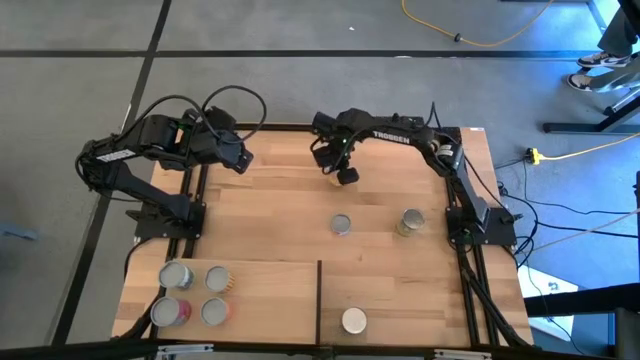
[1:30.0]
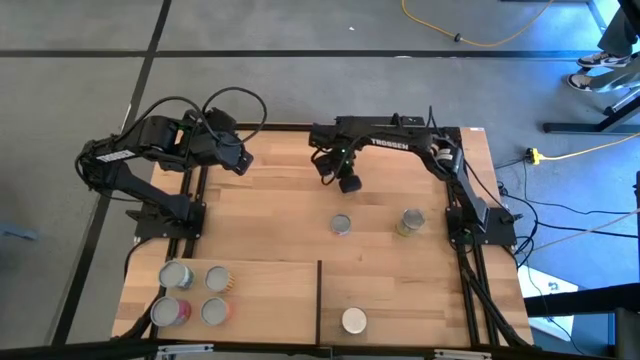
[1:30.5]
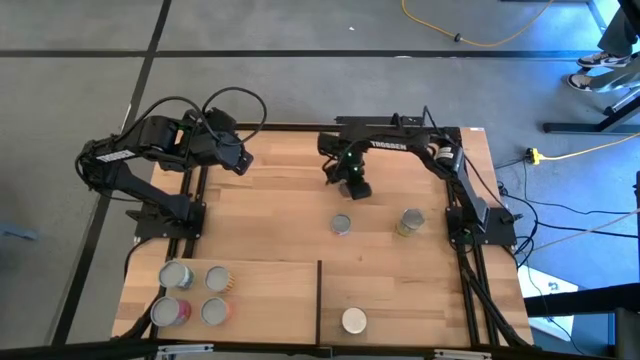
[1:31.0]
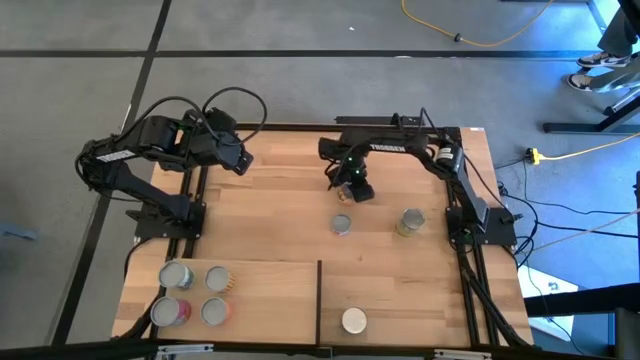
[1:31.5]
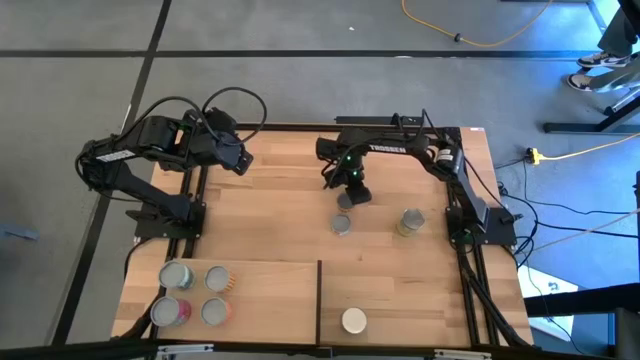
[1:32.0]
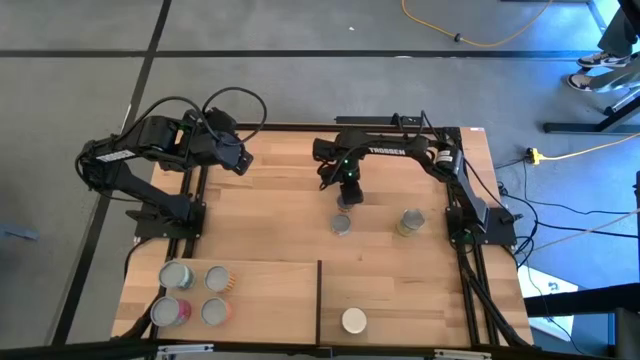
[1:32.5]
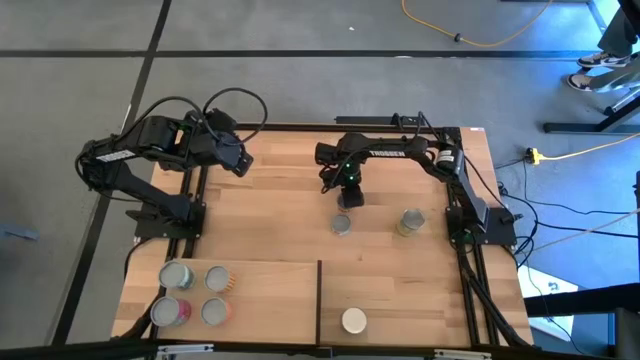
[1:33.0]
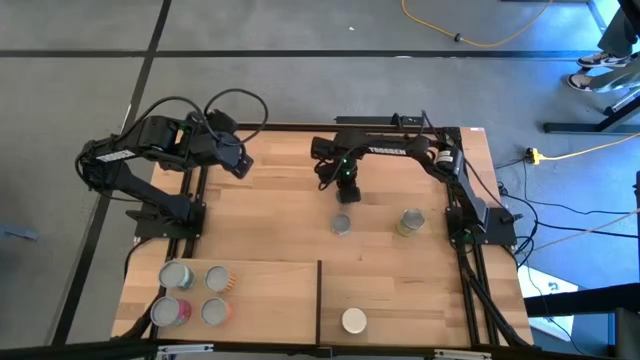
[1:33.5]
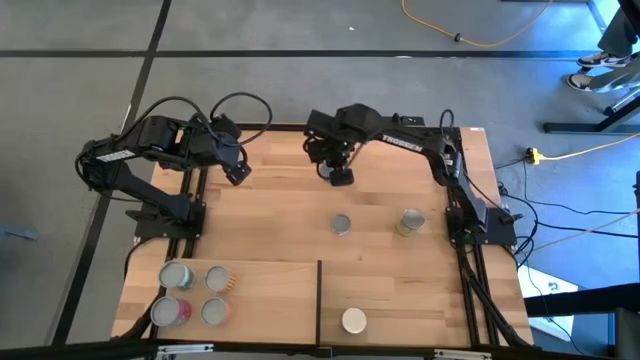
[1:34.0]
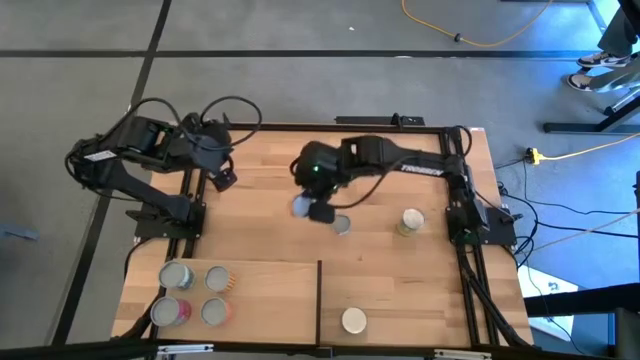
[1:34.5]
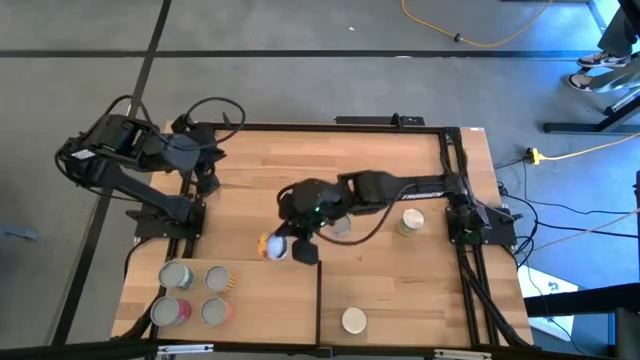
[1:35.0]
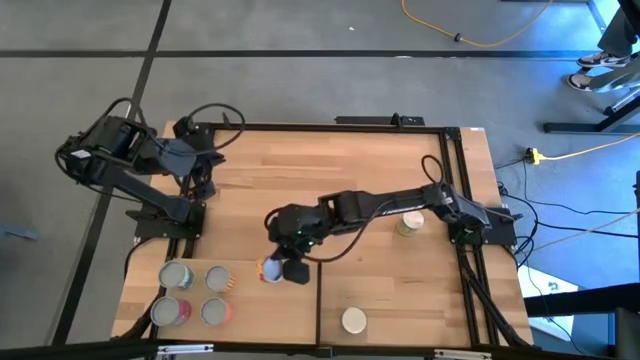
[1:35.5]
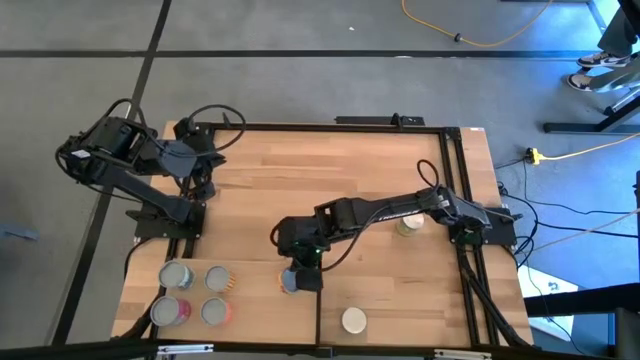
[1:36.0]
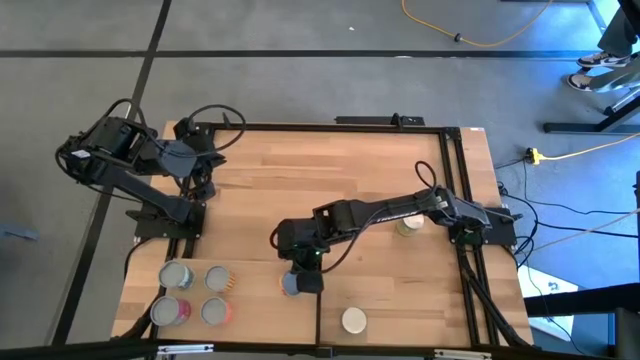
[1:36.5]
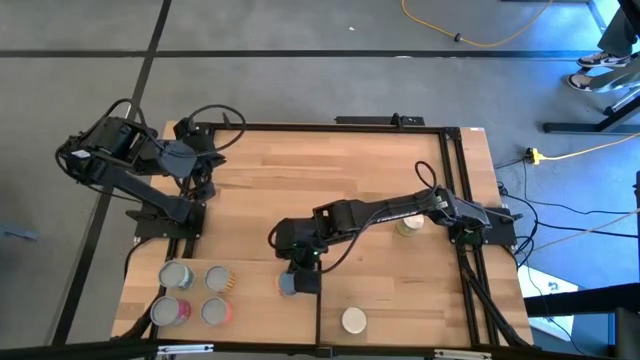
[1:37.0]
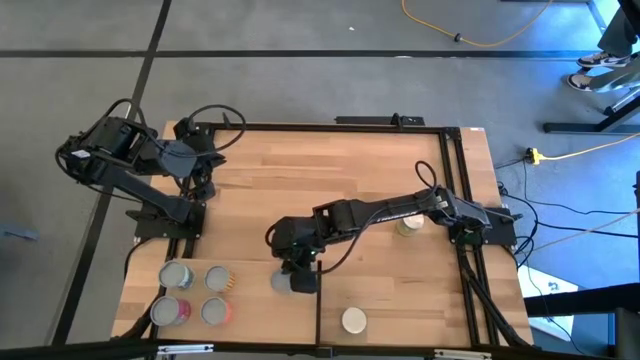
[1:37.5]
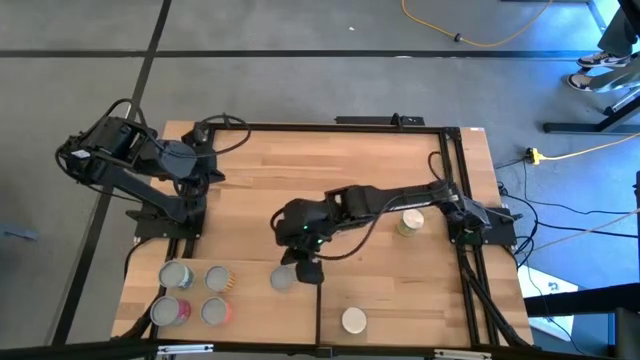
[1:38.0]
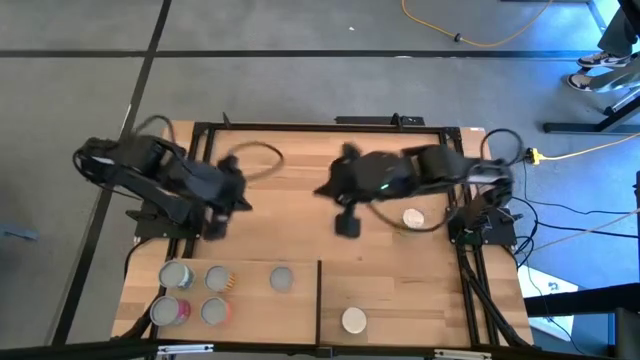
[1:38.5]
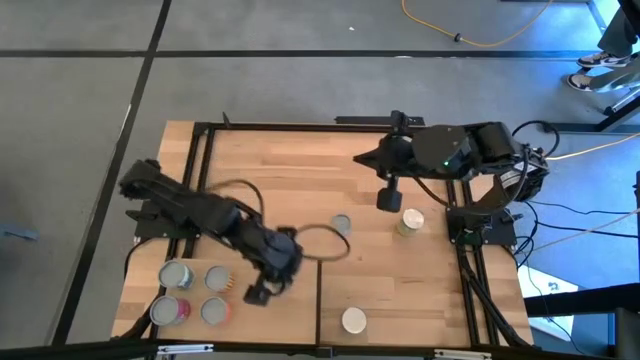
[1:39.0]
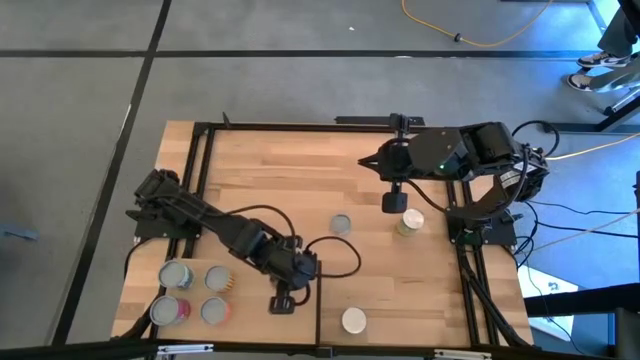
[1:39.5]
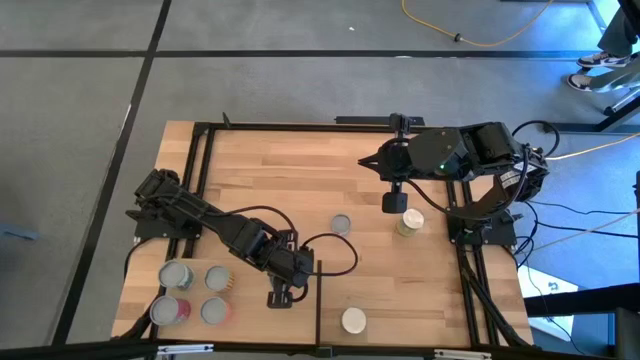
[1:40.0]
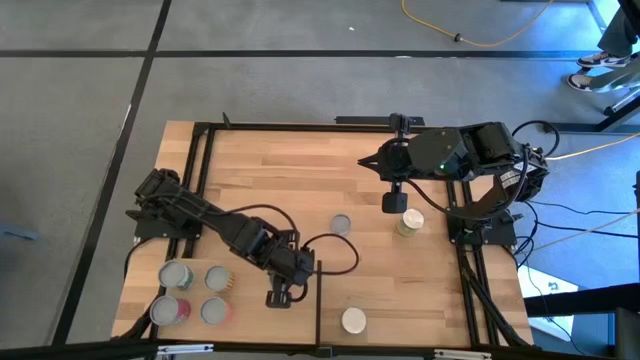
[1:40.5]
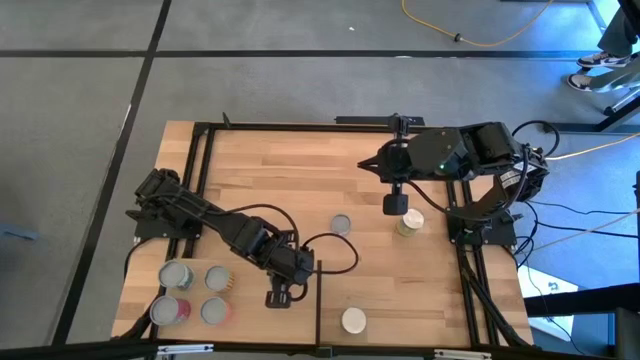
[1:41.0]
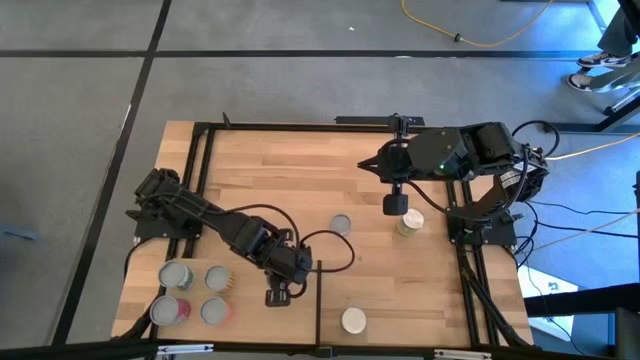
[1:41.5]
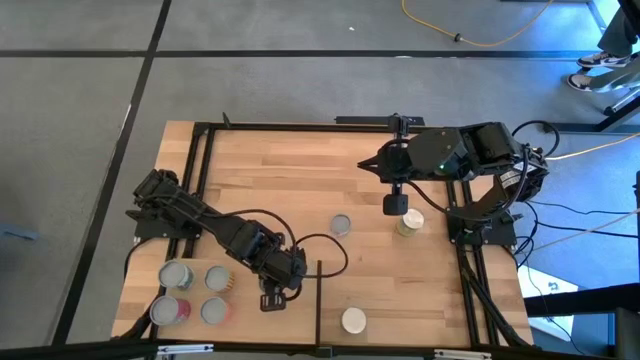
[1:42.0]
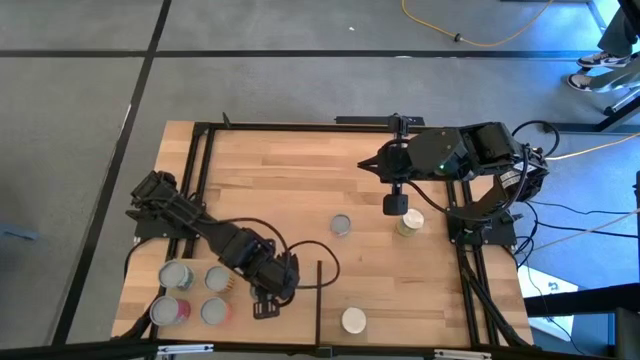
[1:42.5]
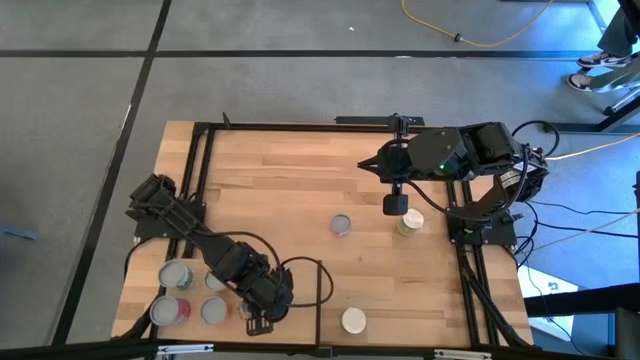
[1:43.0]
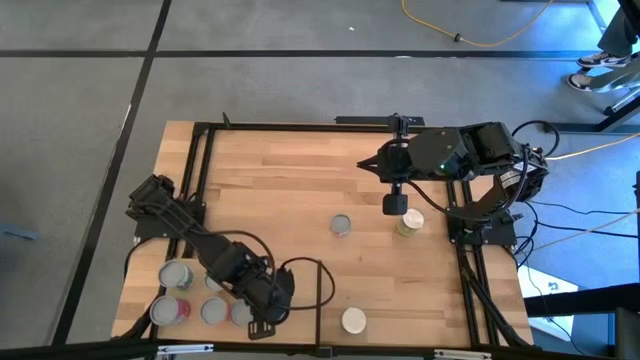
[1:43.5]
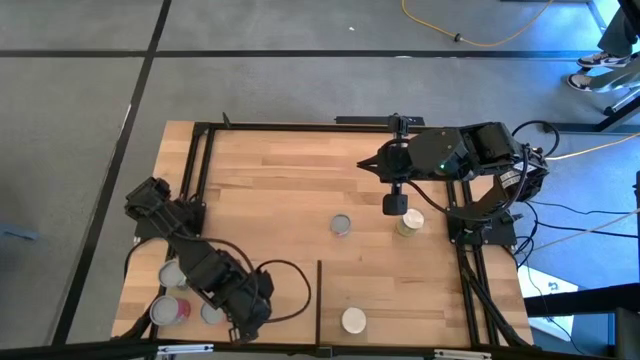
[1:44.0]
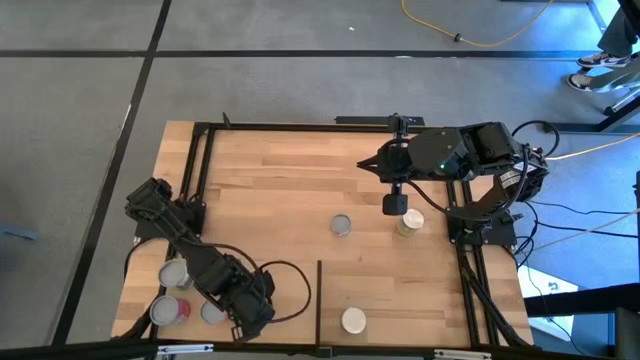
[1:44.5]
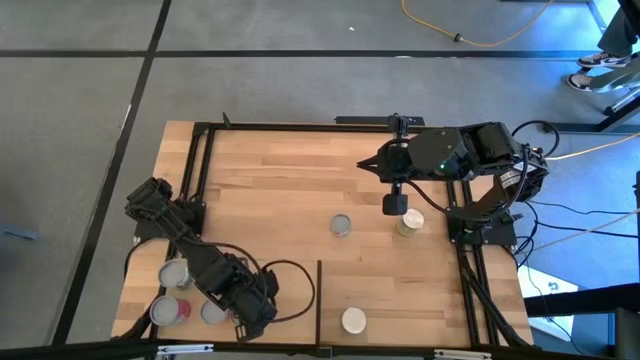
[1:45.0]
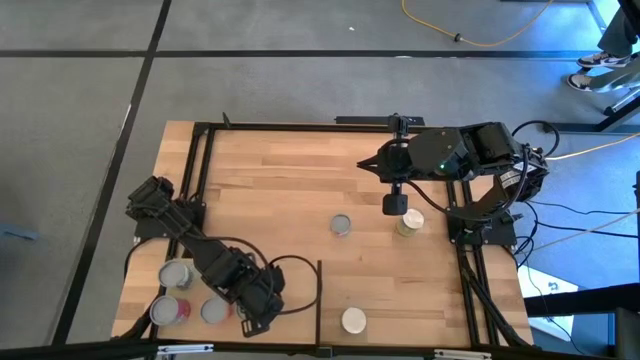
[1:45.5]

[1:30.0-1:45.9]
Task: Pick and place cans onto a shelf
Put the canned pineapple ring on the shelf

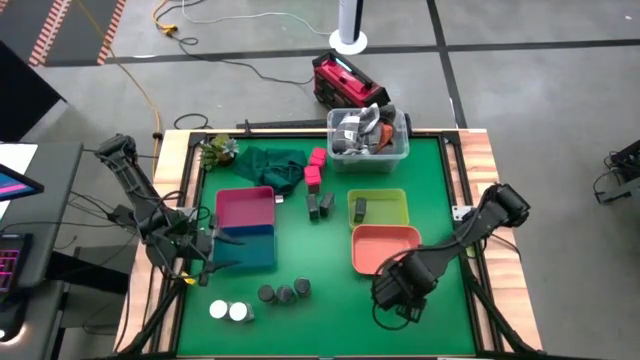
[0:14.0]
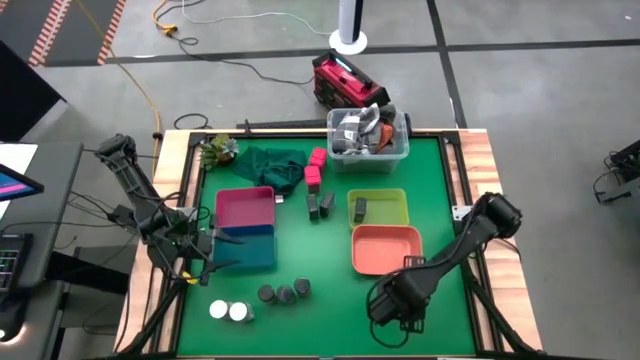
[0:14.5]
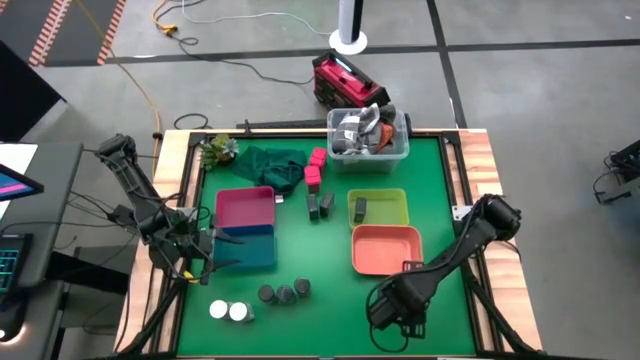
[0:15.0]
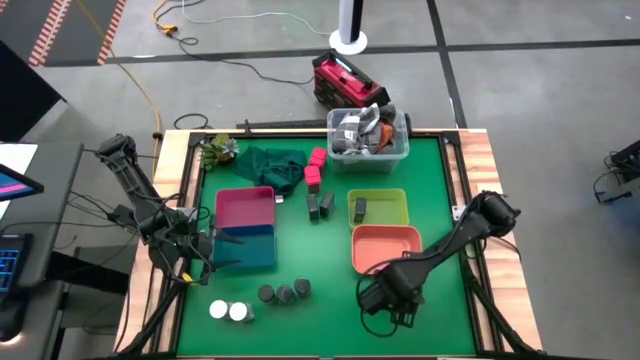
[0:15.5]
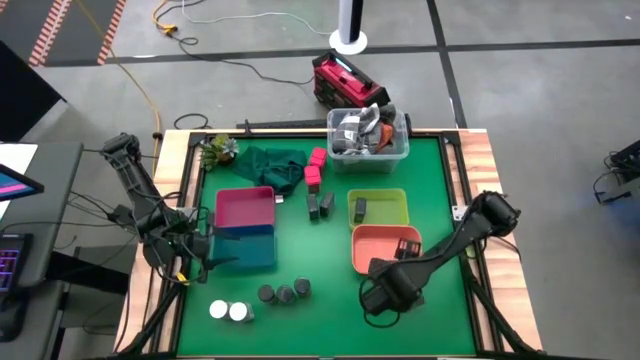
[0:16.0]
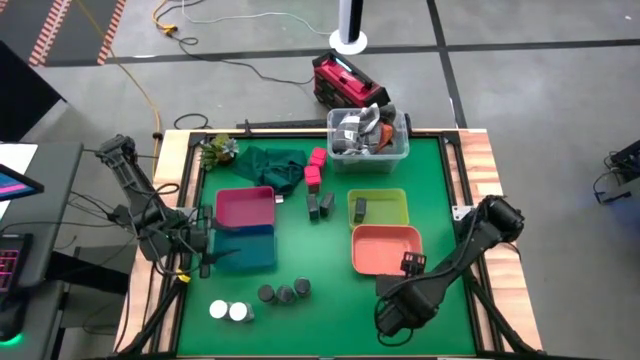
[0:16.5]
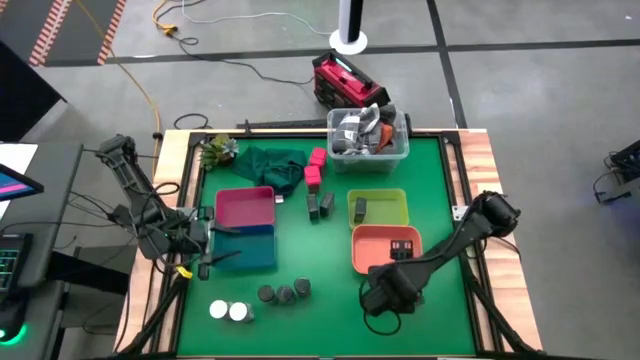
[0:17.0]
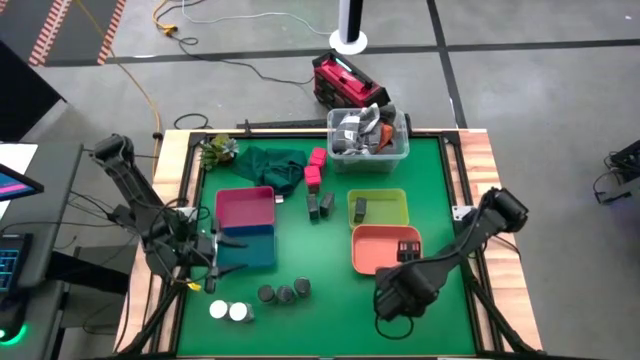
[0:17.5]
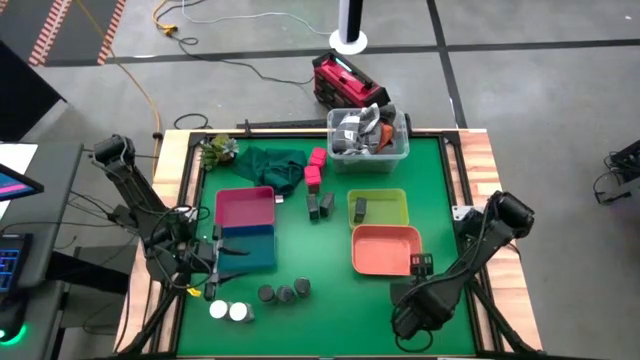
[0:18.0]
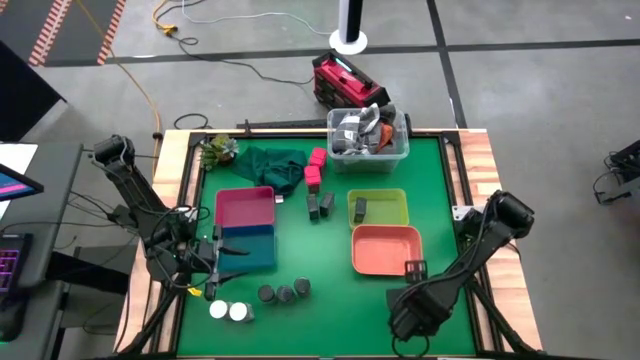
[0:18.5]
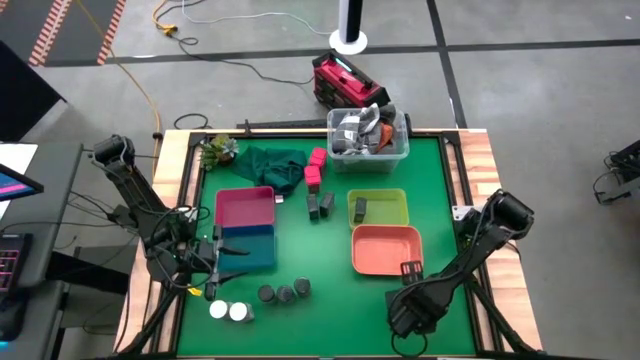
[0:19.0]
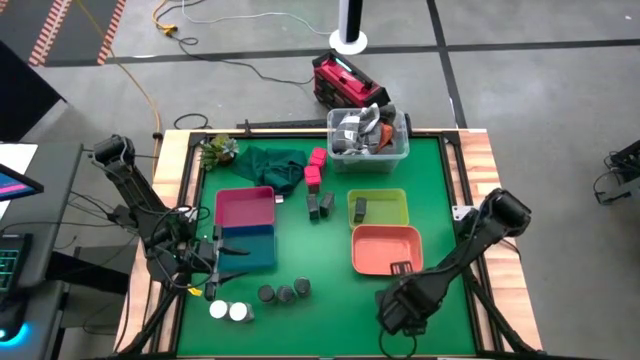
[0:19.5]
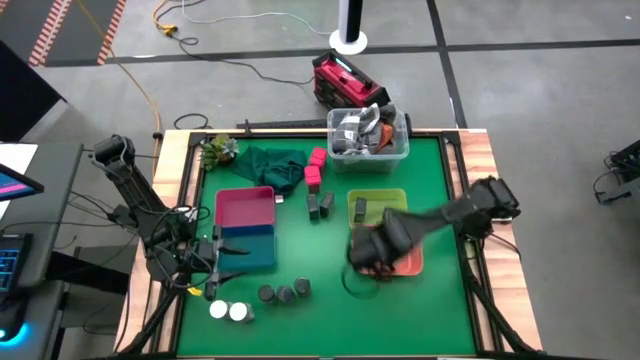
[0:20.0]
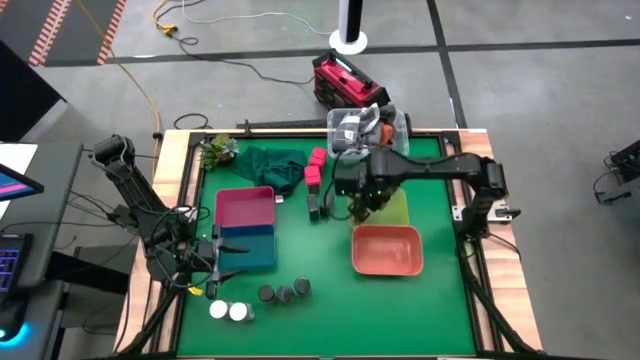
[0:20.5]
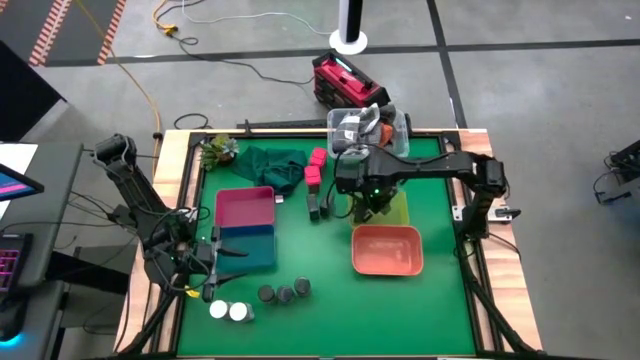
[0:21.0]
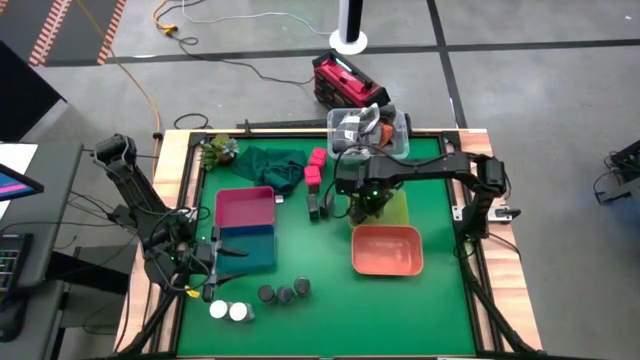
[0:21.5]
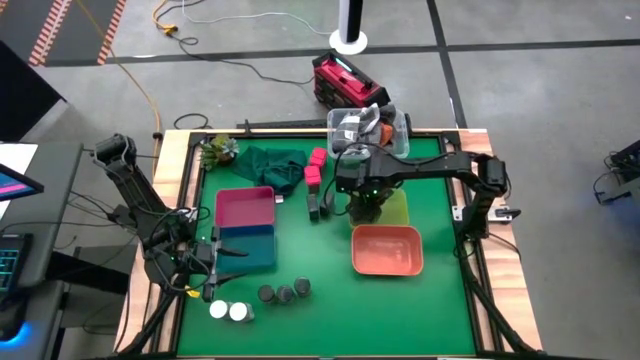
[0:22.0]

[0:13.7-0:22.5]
Task: Sort spices by type
Put the black spice can into the yellow bin
